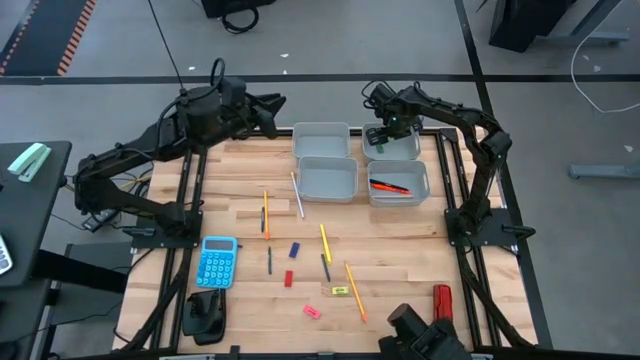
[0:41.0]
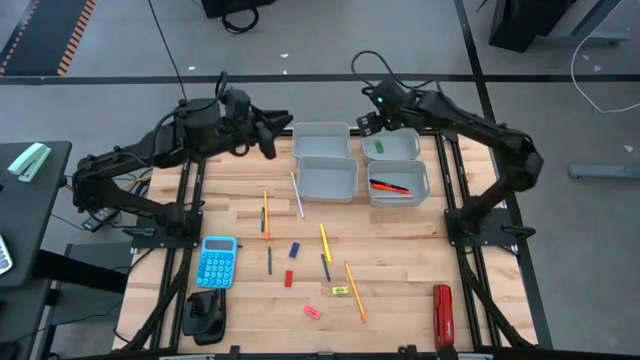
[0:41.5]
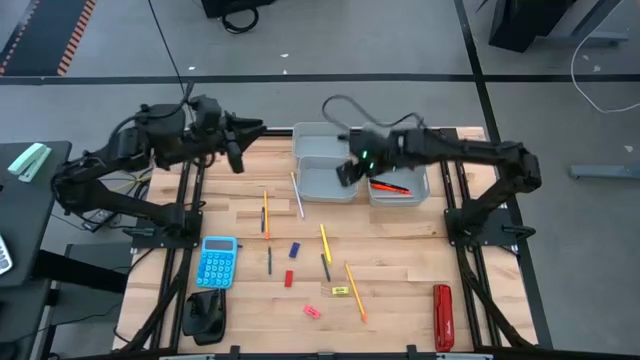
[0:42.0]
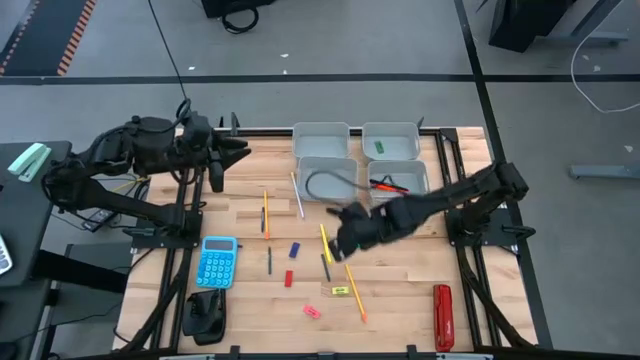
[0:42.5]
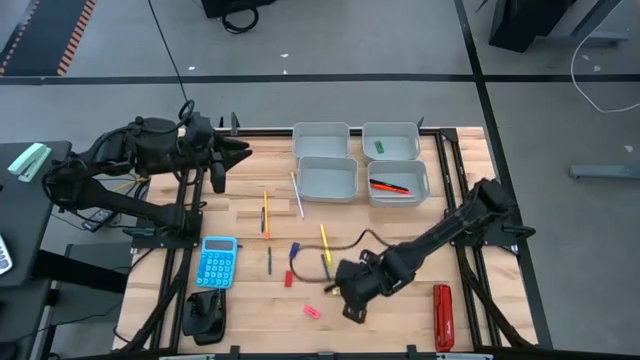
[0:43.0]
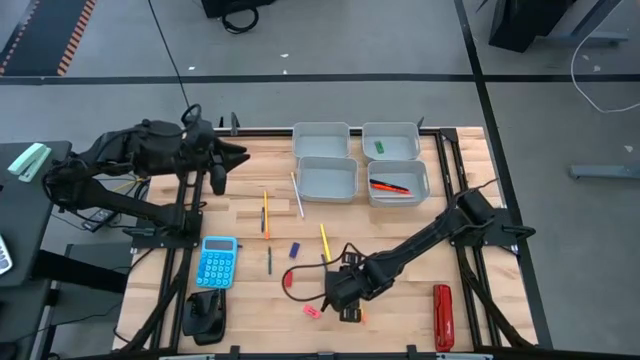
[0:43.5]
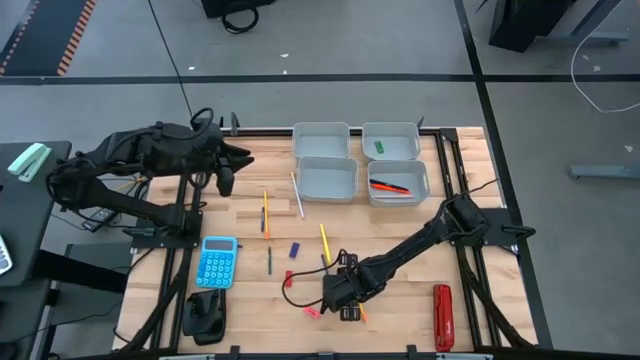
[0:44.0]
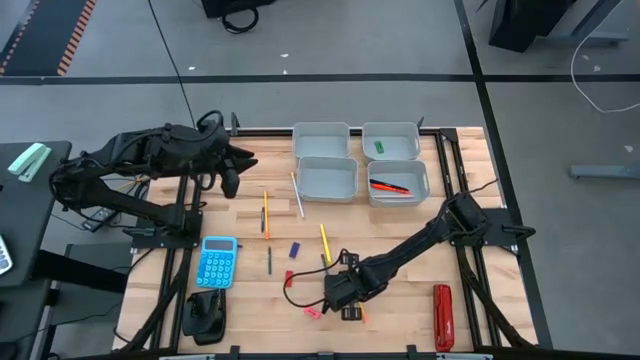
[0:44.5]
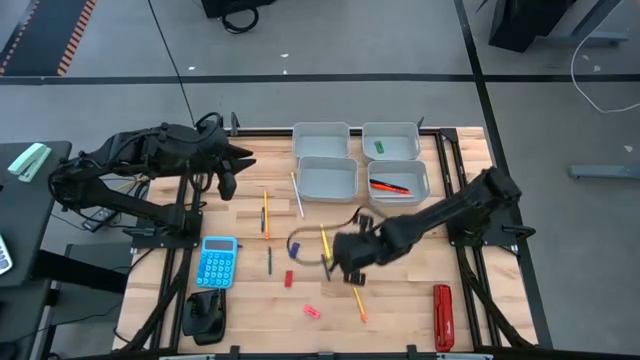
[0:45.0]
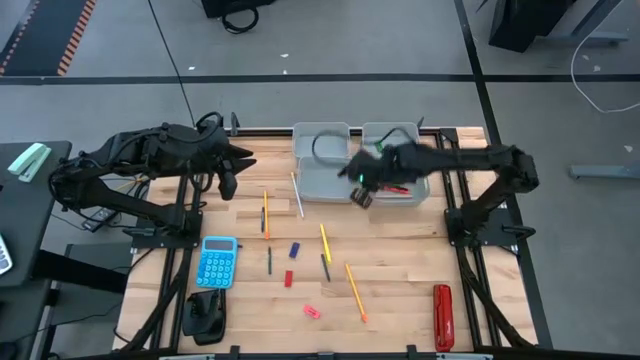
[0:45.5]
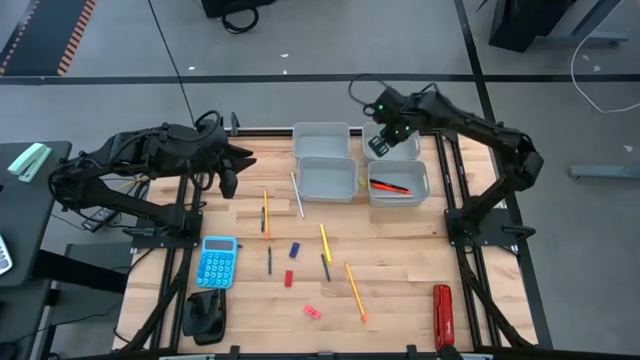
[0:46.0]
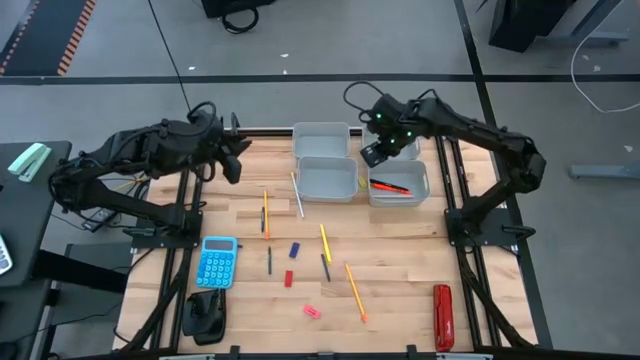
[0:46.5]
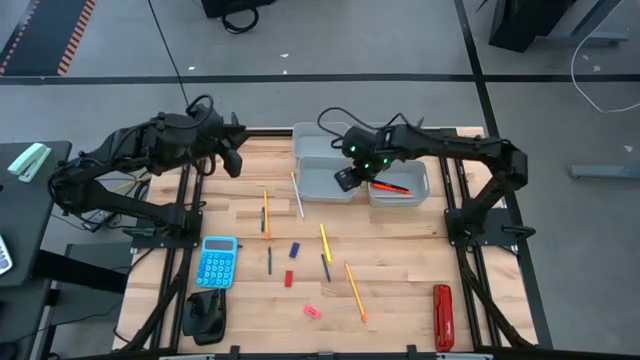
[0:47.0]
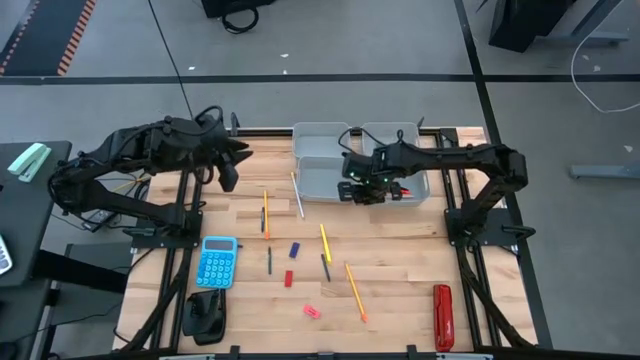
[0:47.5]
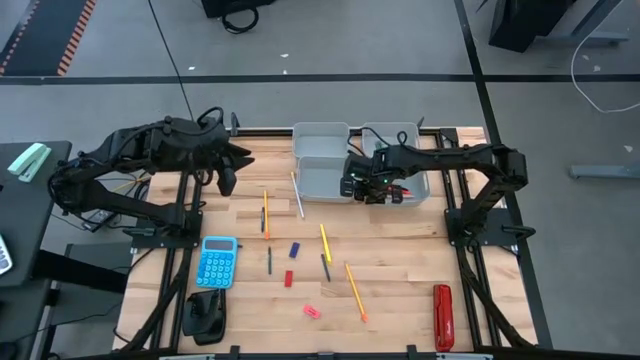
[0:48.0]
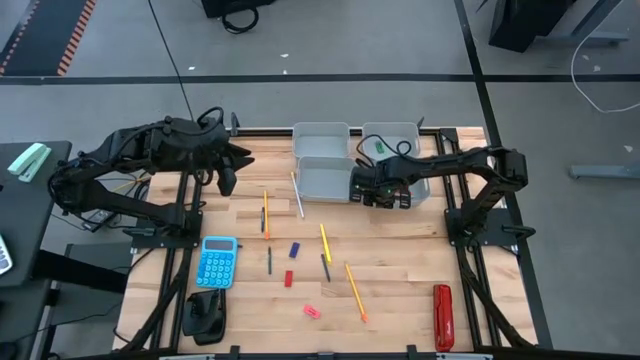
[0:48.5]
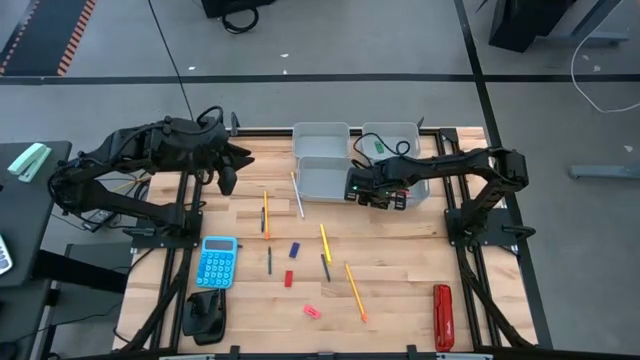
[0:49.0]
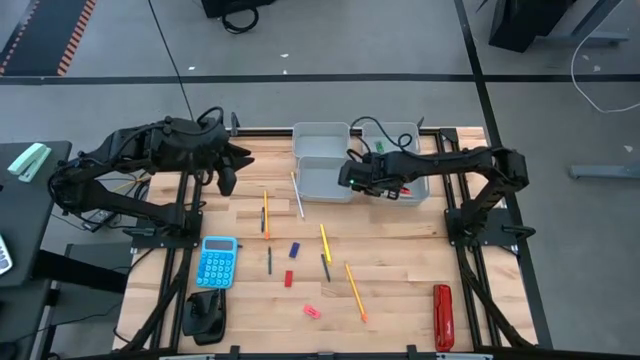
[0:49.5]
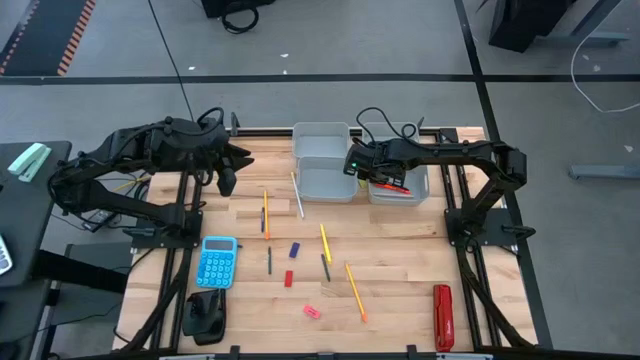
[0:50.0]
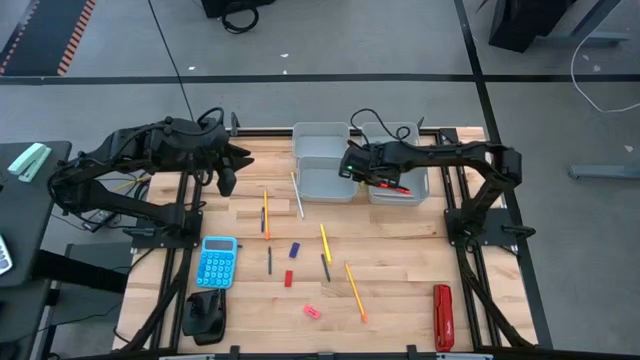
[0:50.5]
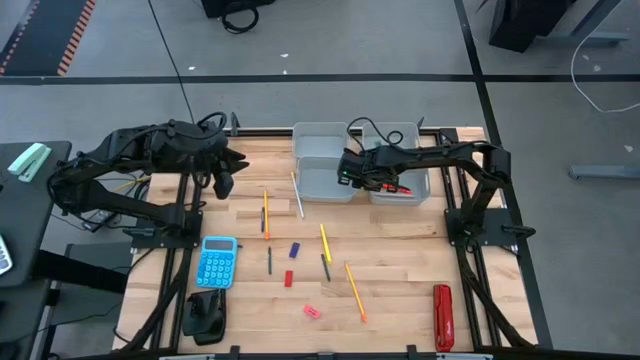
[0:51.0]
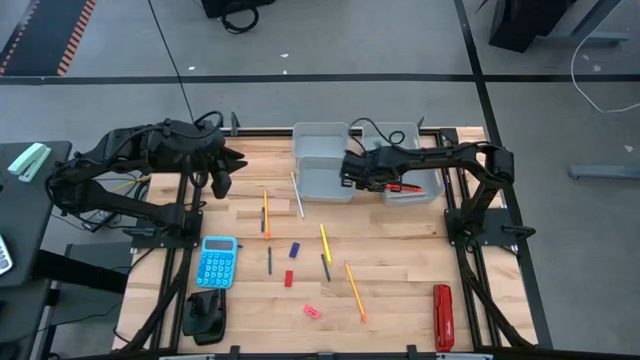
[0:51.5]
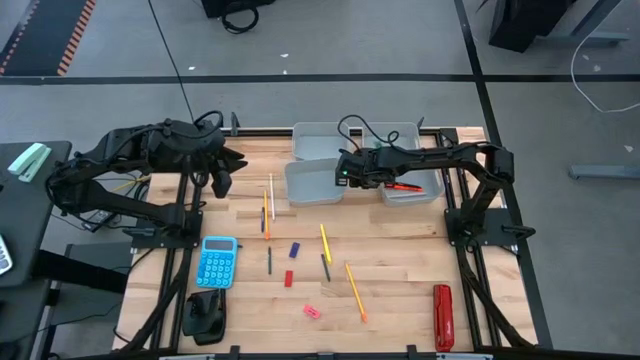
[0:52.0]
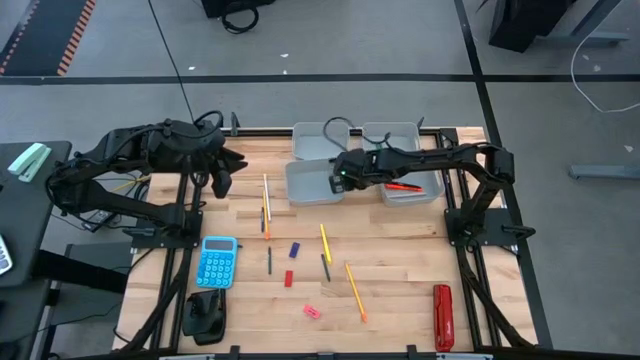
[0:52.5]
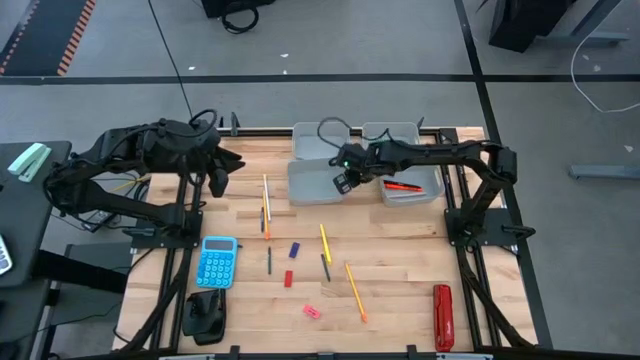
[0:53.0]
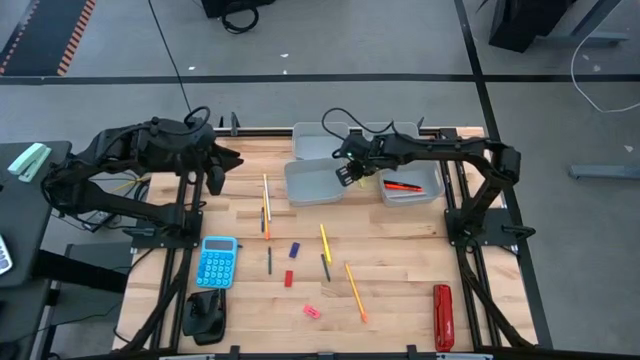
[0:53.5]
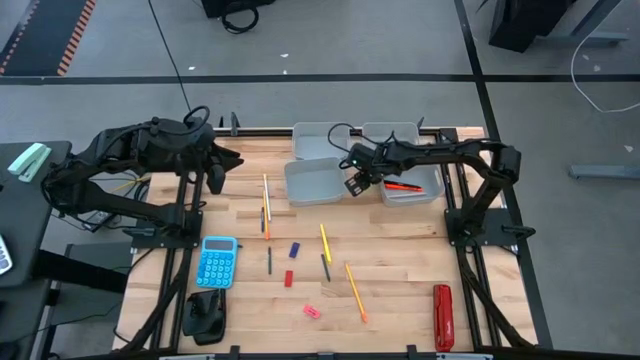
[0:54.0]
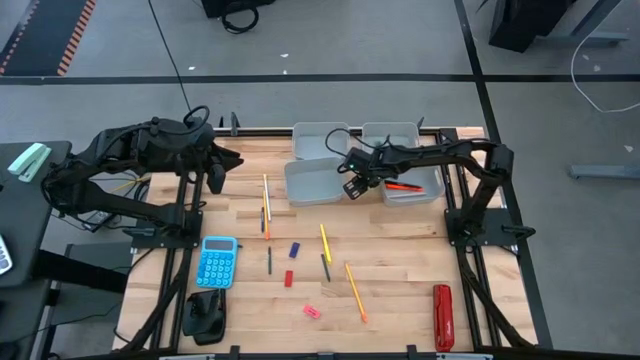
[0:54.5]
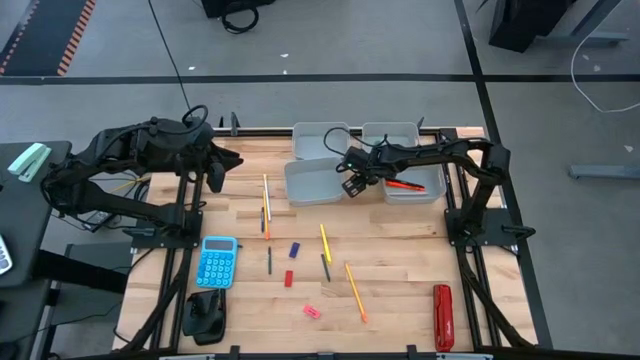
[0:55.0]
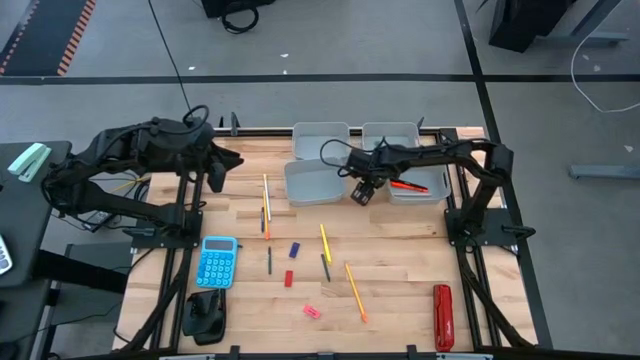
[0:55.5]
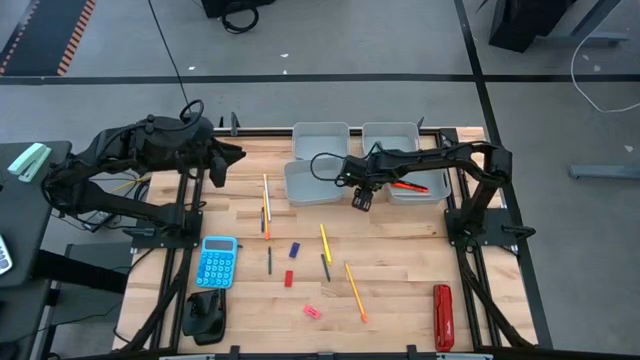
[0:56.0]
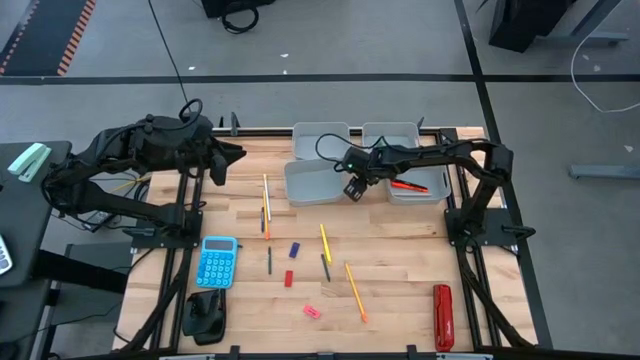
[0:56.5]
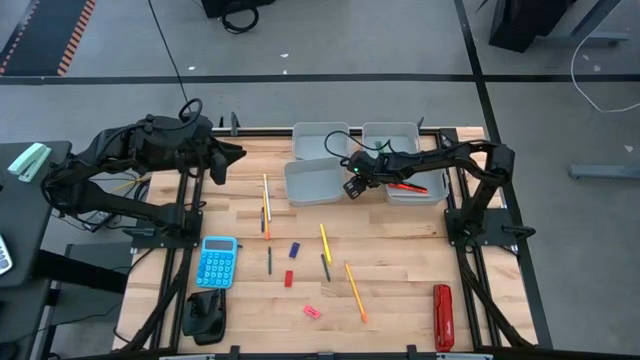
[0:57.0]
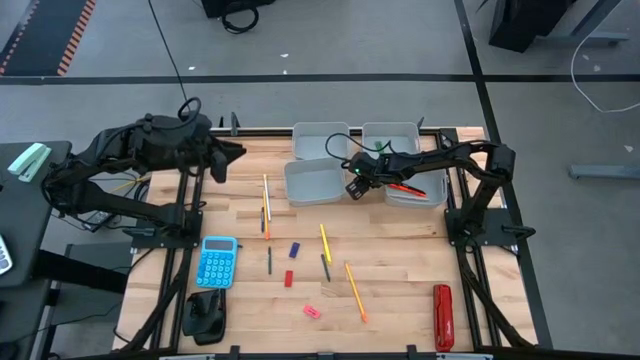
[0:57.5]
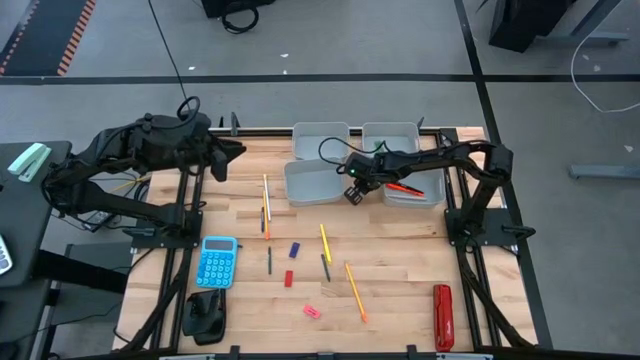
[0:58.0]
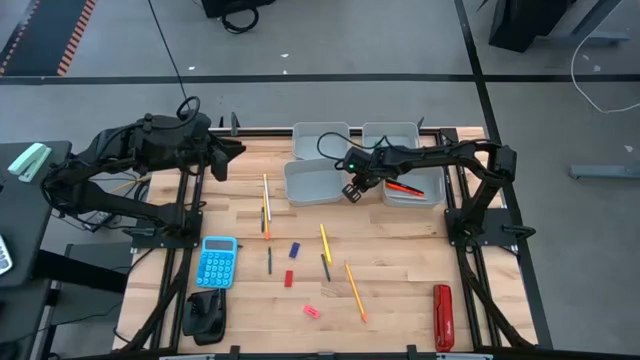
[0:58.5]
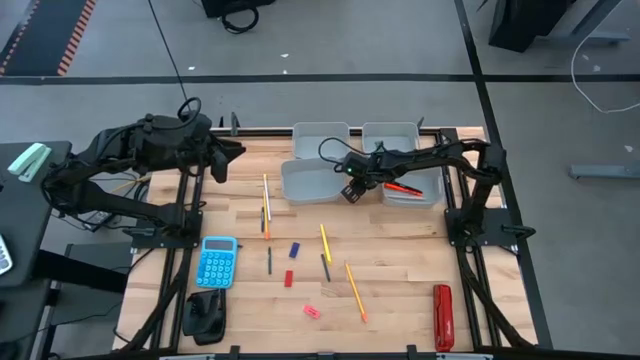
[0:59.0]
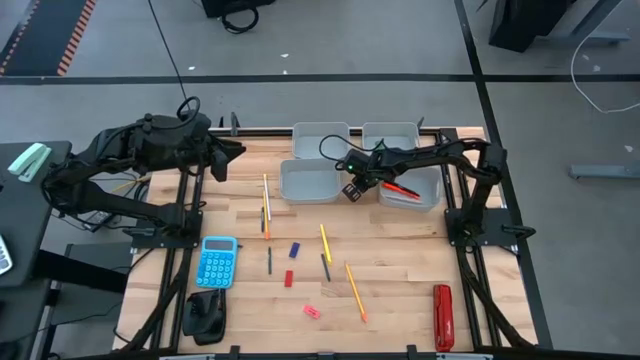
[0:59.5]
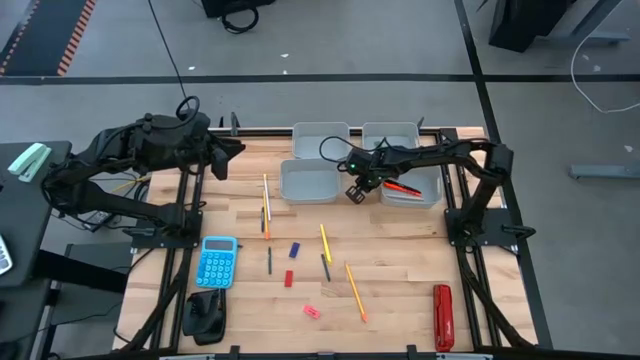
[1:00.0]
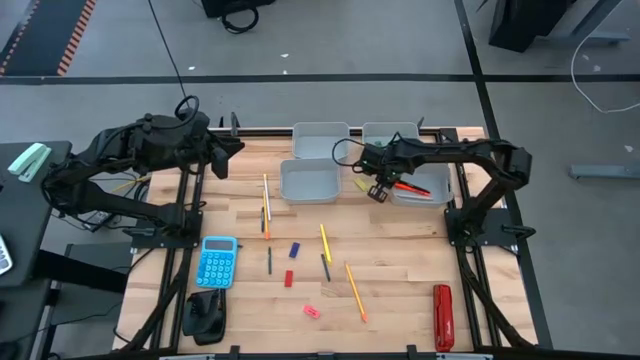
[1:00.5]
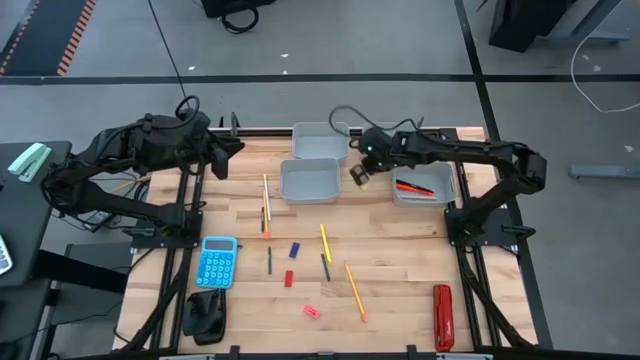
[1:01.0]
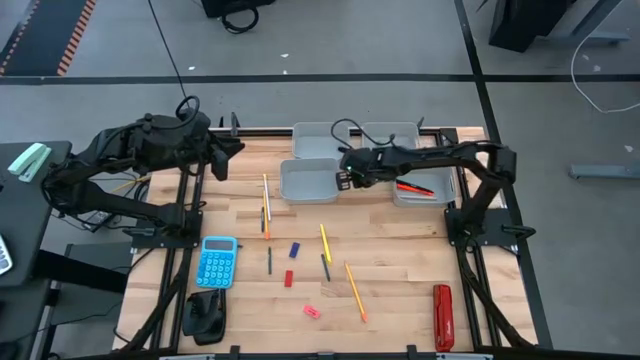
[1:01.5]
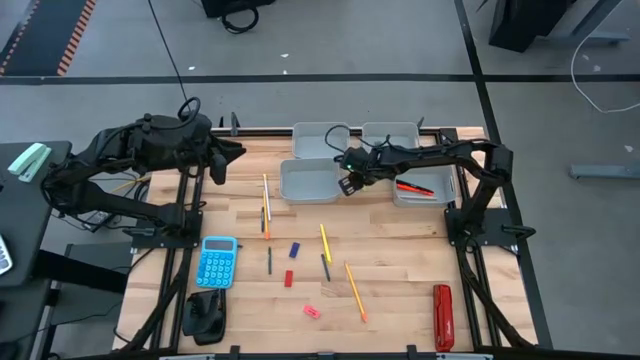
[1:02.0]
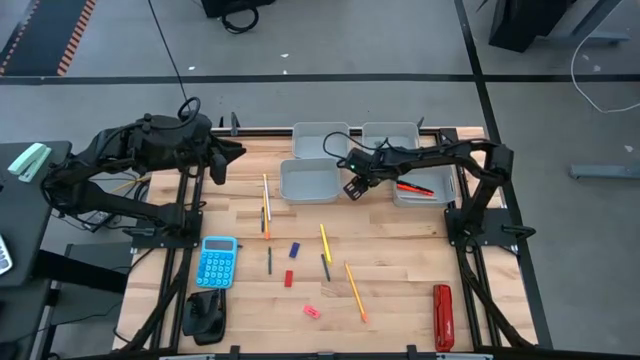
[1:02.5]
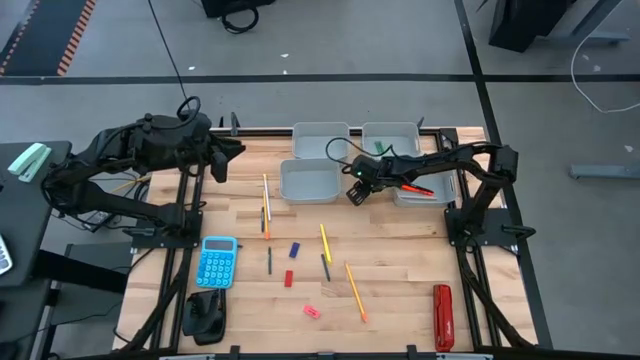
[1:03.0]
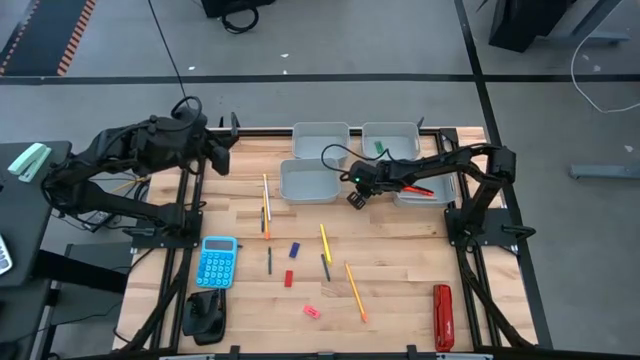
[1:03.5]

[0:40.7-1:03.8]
Task: Sort crayons/erasers/pens/pencils in bins
Put the yellow eraser into the top right gray bin
